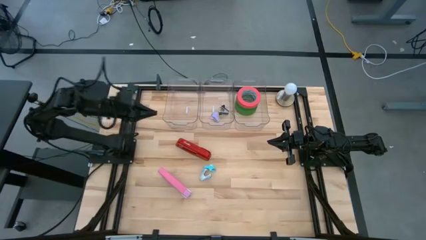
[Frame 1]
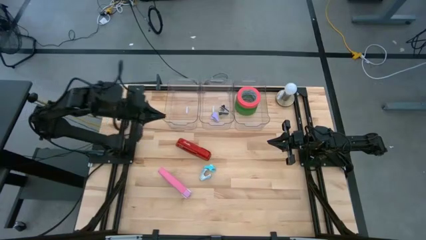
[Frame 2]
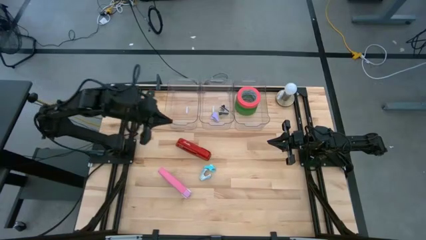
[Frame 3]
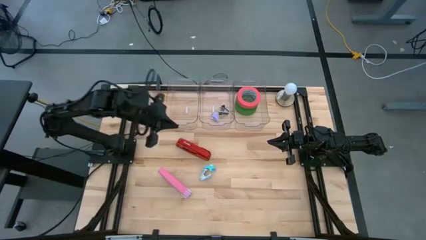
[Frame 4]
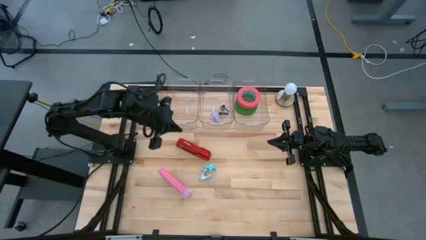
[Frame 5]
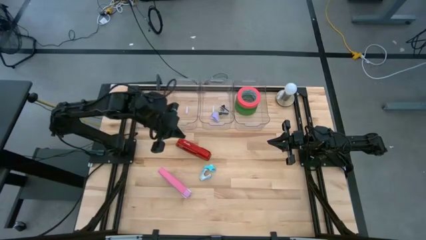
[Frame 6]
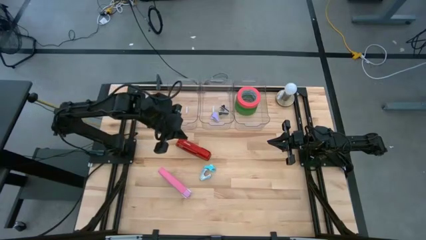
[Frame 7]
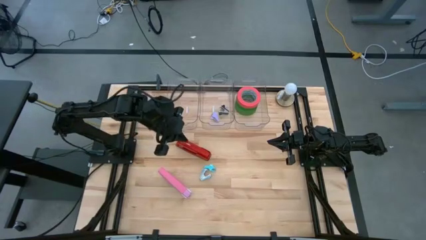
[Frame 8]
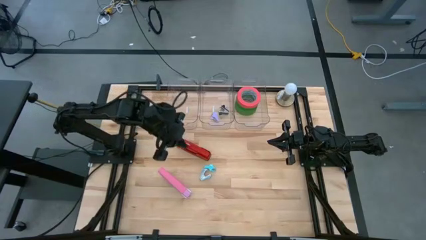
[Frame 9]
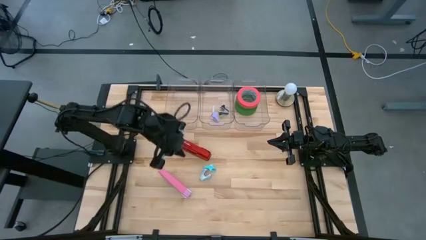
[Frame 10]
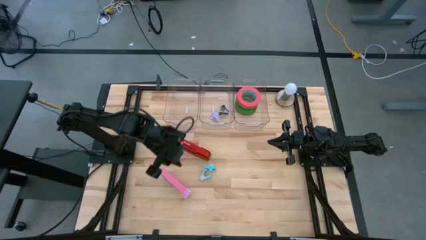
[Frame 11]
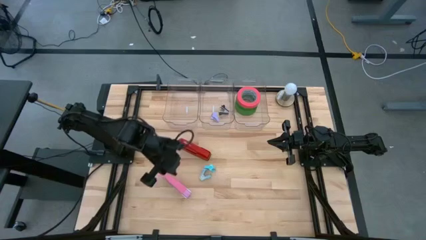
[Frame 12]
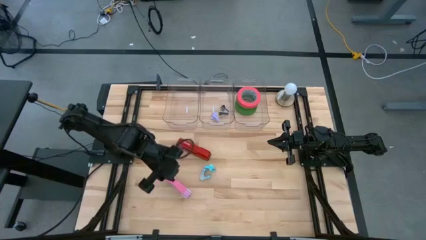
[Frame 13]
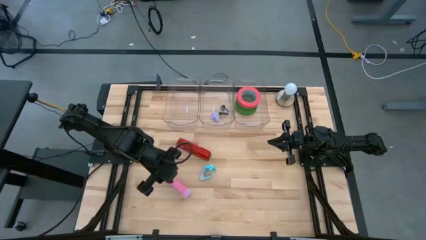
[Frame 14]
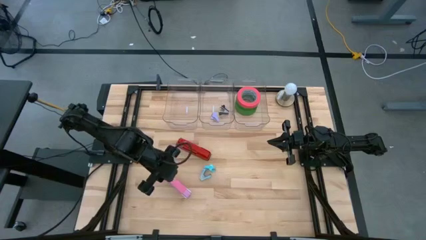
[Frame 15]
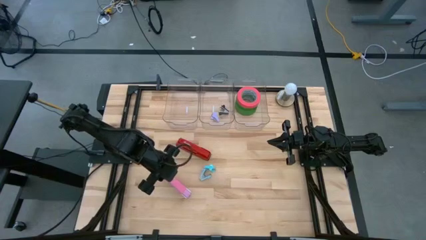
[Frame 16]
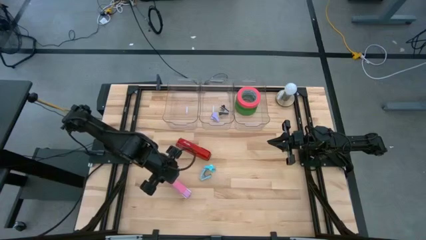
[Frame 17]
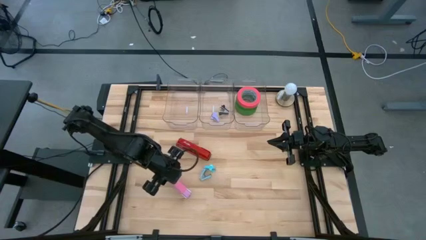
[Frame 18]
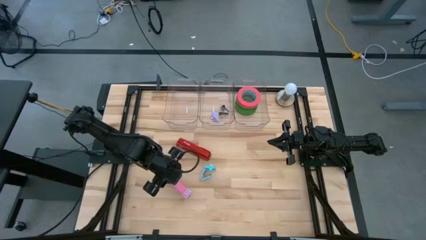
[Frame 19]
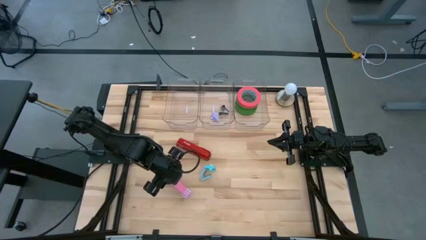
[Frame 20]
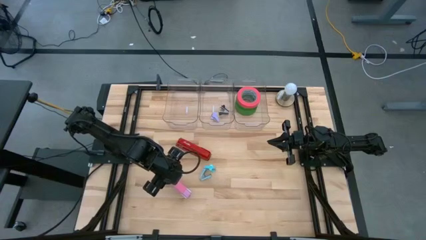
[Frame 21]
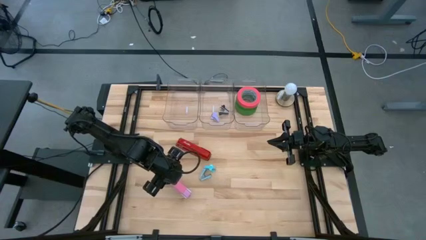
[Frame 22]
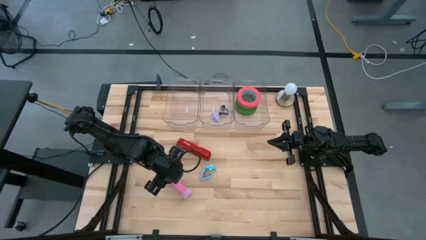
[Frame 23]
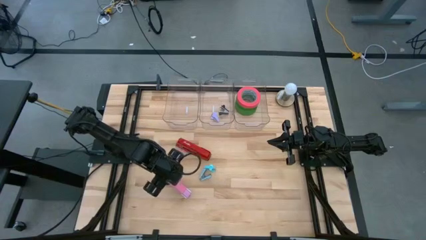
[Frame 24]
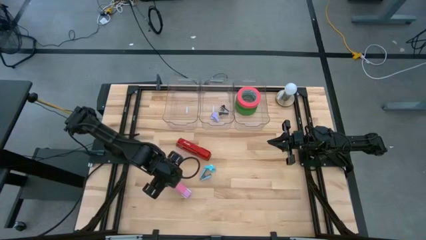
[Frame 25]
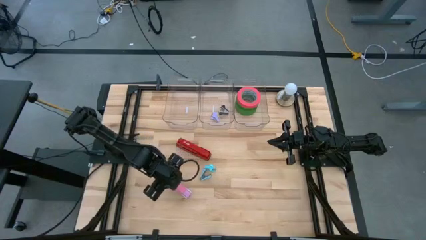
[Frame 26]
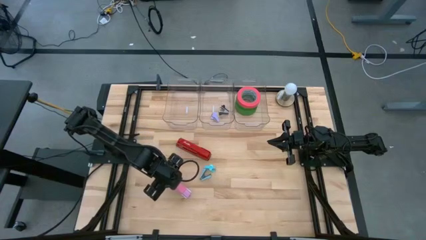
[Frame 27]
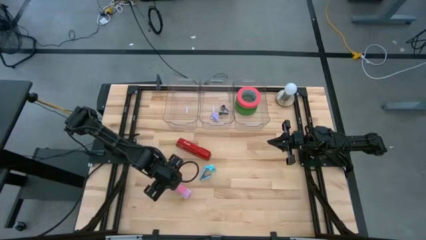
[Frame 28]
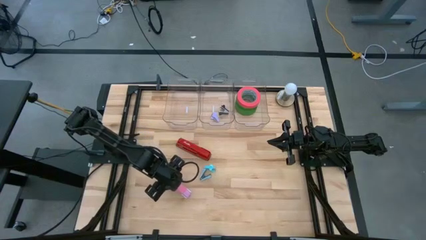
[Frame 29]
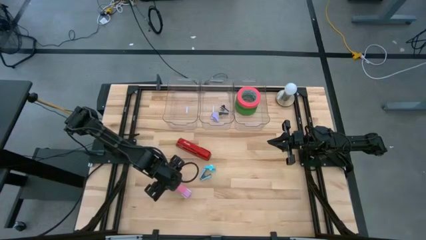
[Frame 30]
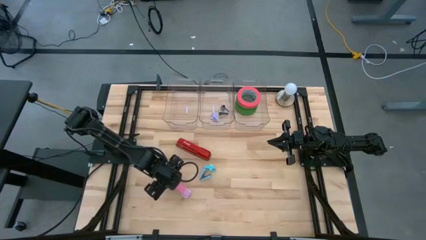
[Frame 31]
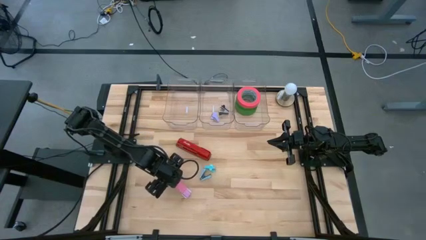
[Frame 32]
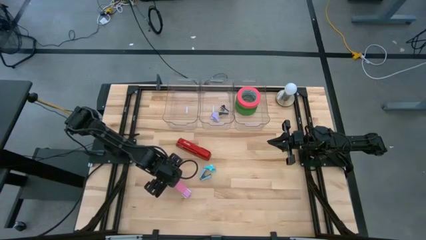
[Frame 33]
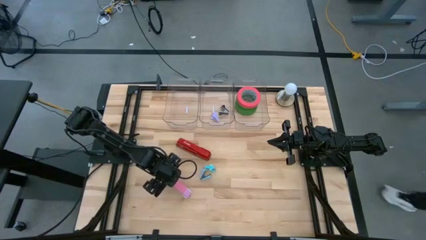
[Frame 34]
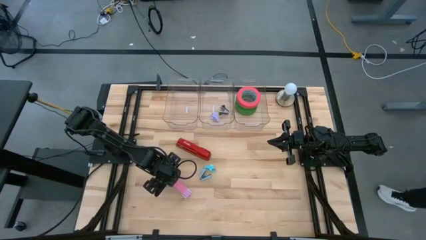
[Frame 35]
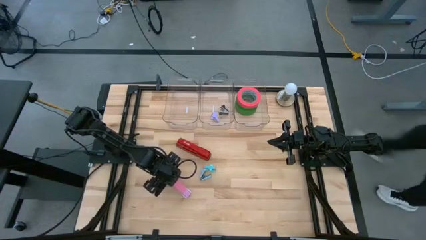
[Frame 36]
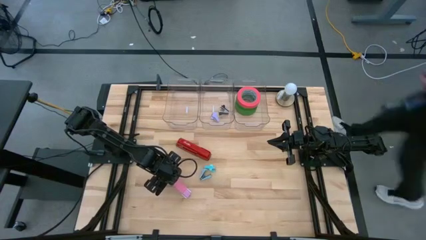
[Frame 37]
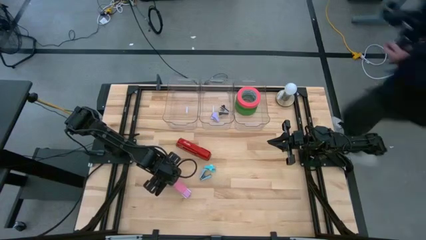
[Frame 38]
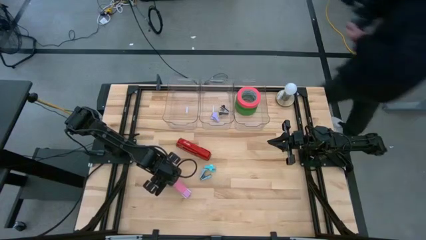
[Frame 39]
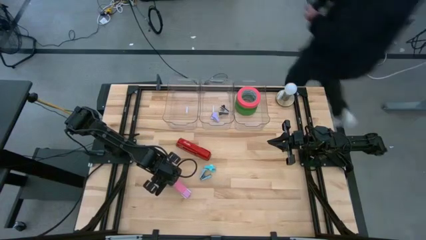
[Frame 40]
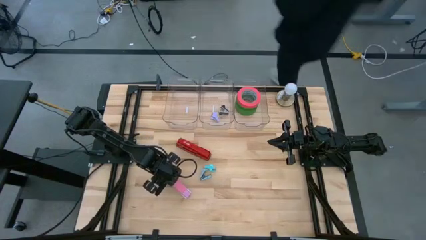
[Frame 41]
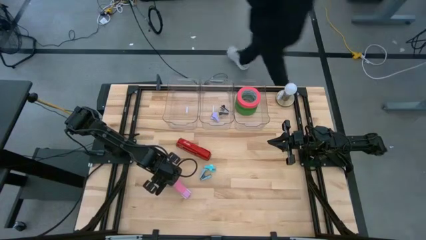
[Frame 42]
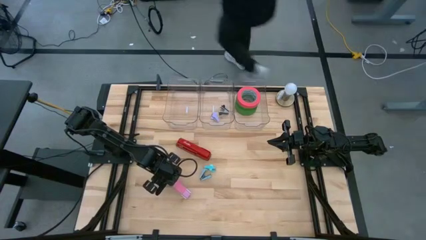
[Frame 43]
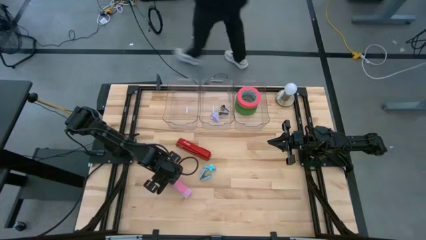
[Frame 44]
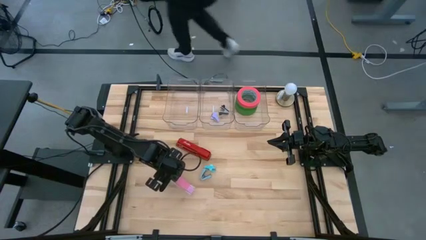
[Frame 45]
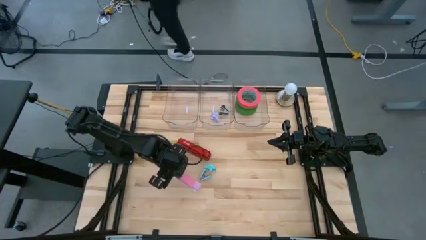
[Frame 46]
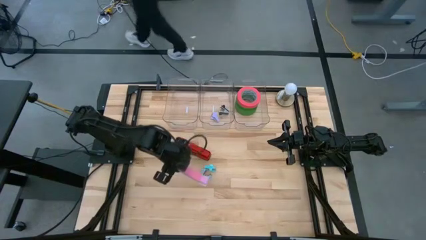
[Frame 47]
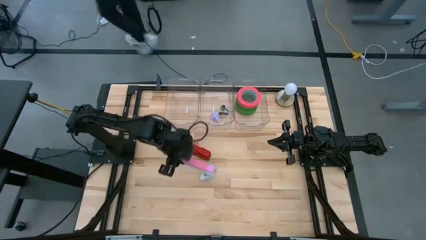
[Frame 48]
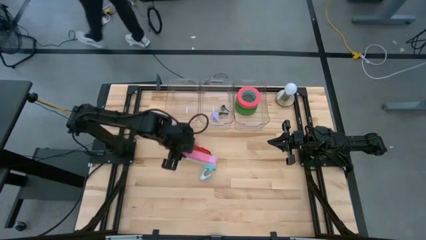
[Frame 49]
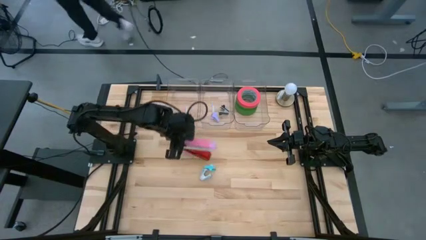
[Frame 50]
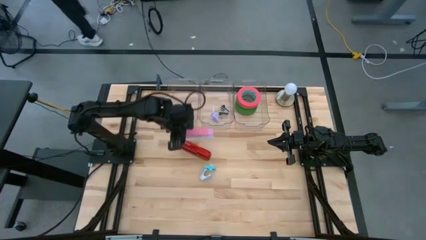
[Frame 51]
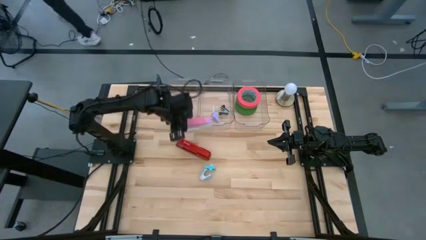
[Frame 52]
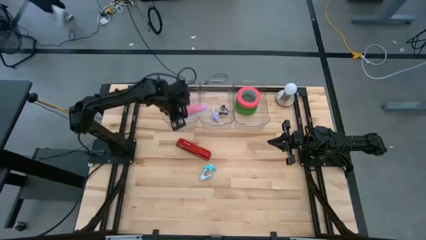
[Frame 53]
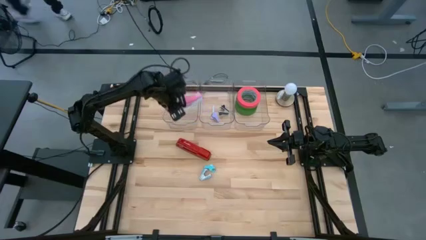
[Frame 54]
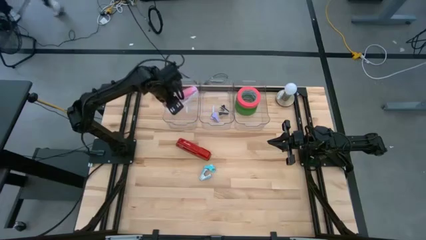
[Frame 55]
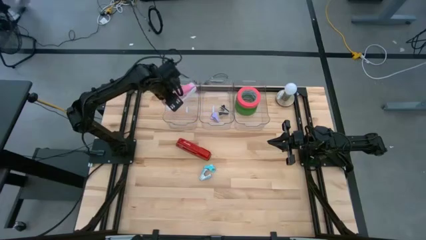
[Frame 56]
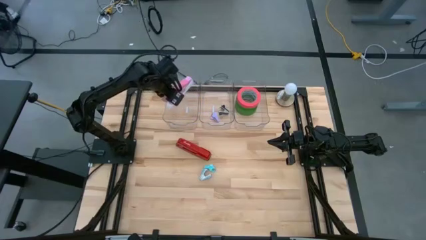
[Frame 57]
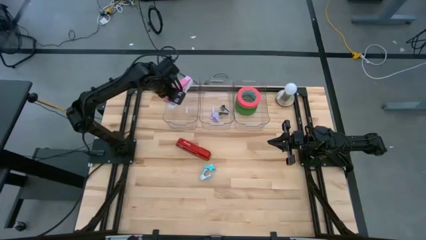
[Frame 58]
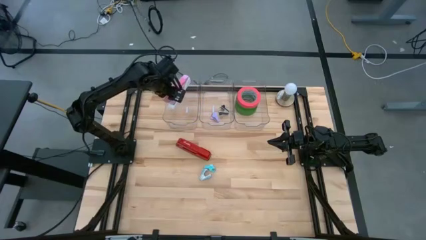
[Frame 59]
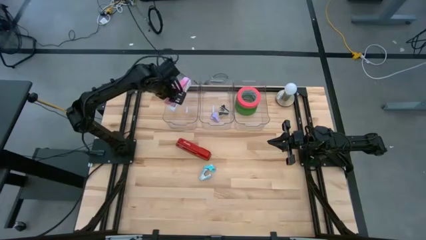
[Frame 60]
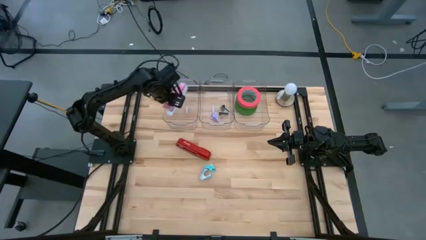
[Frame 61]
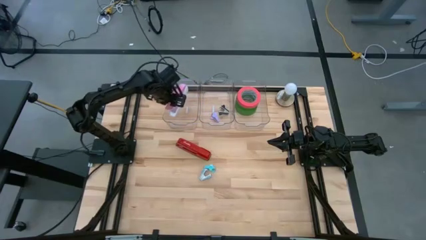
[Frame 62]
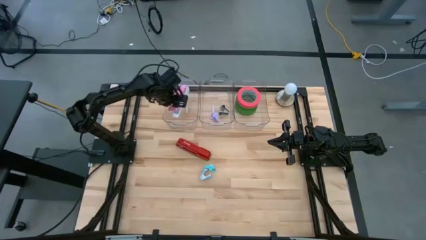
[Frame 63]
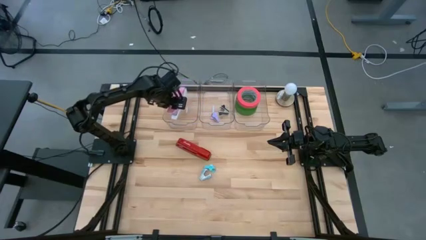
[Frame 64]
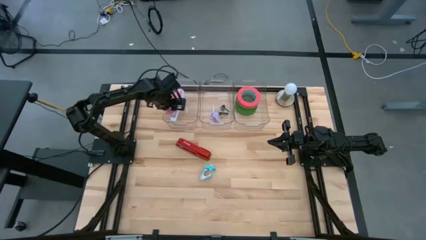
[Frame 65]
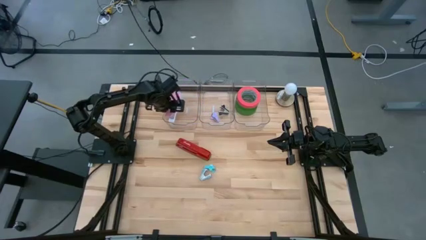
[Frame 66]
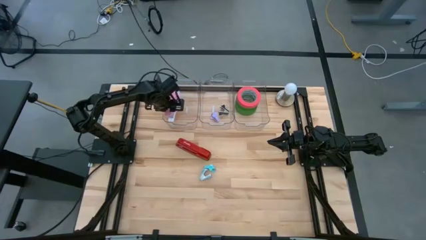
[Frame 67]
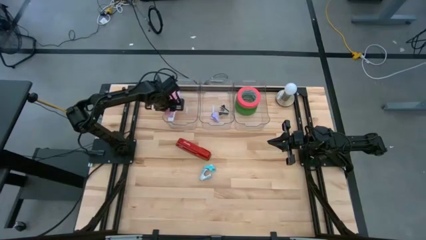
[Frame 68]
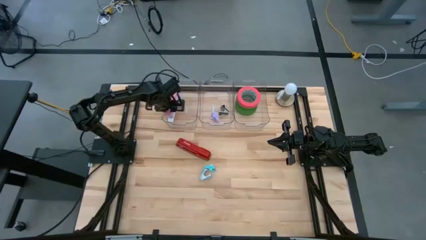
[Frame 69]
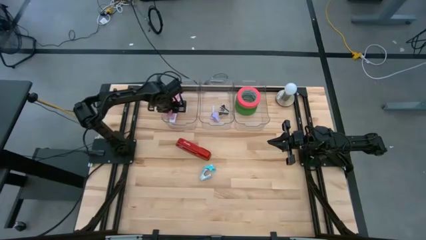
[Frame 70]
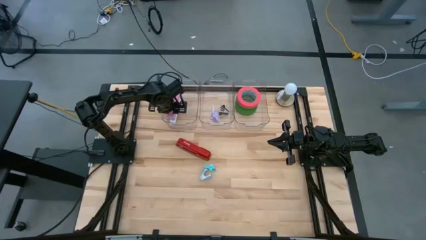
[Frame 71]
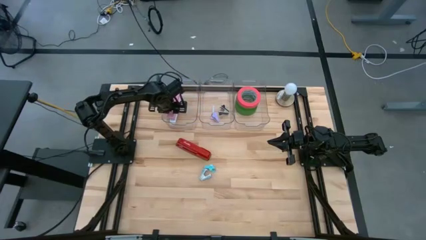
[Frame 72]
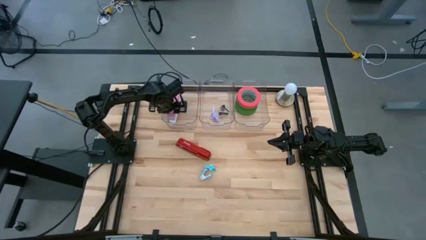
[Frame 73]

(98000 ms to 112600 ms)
Task: Pick and place Stapler, Stapler remover, tape
Put the pink stapler into the left transparent bin
